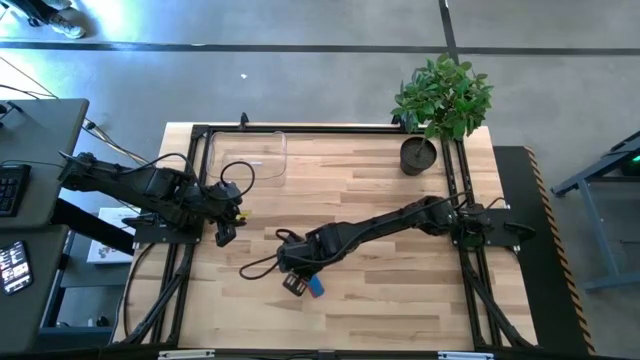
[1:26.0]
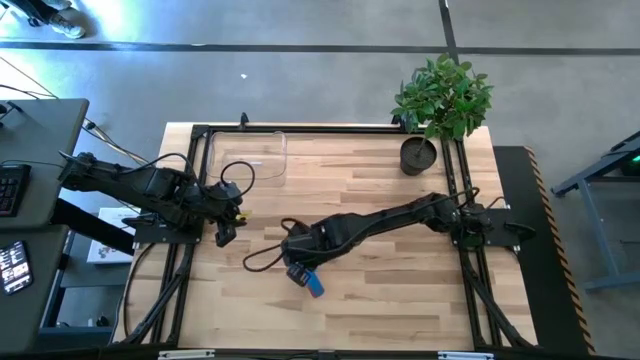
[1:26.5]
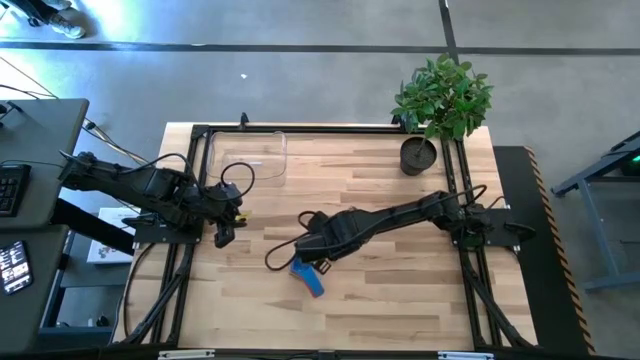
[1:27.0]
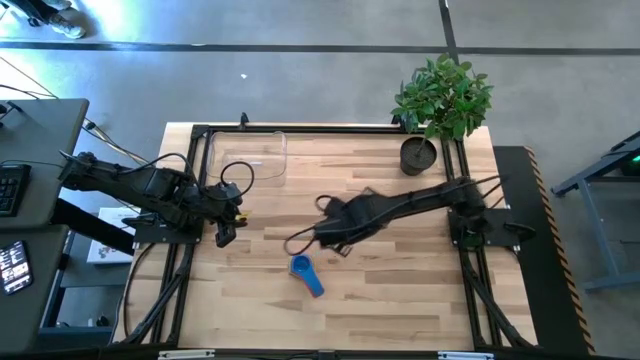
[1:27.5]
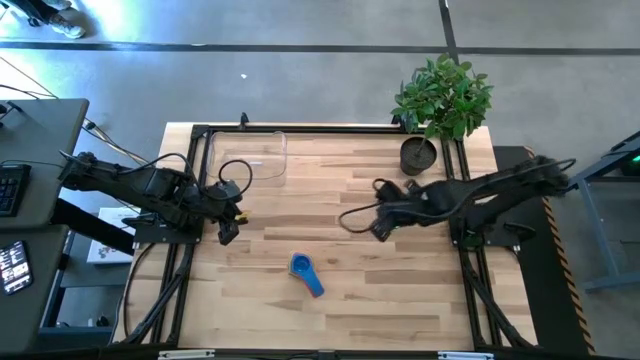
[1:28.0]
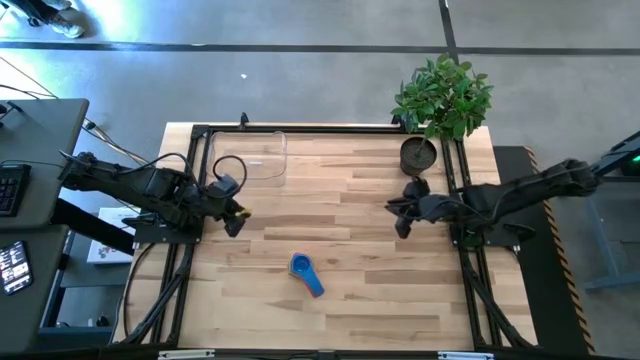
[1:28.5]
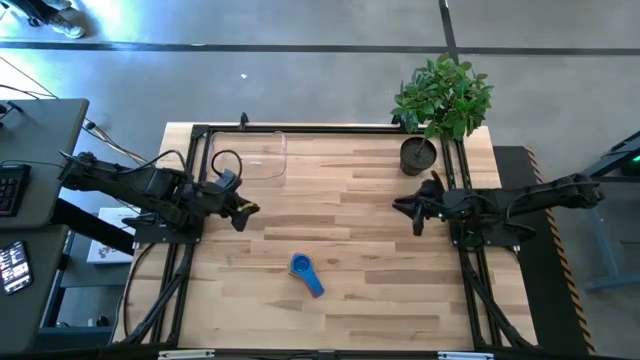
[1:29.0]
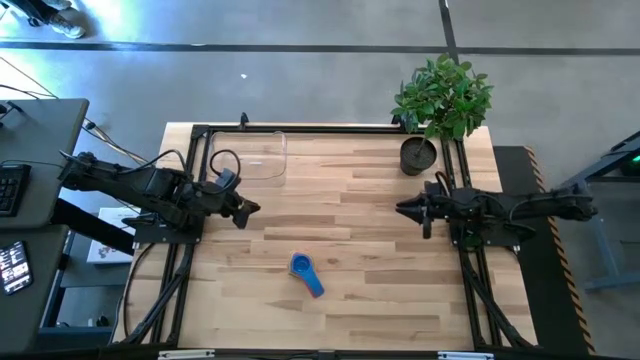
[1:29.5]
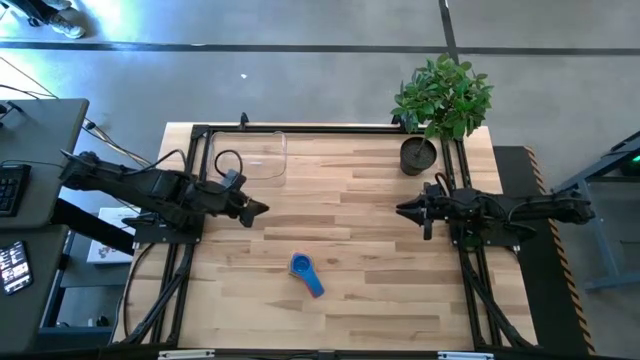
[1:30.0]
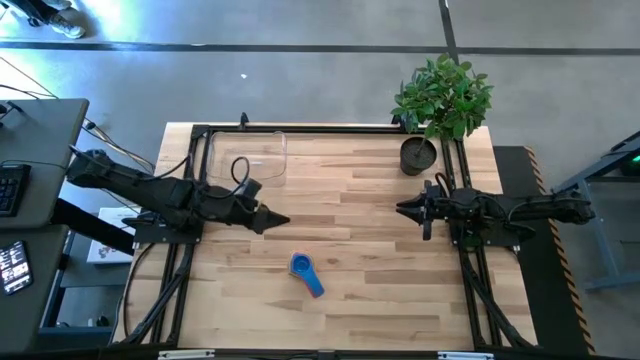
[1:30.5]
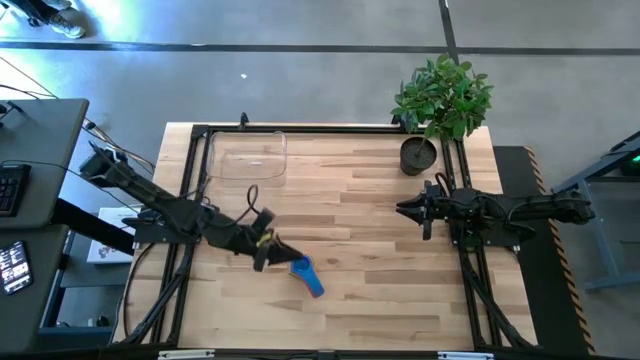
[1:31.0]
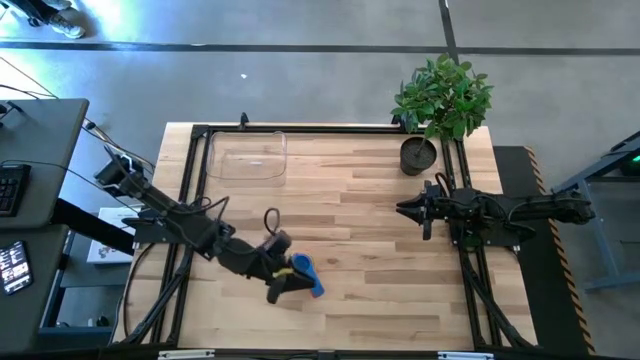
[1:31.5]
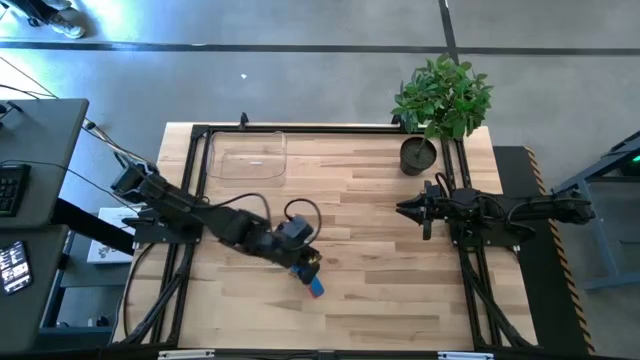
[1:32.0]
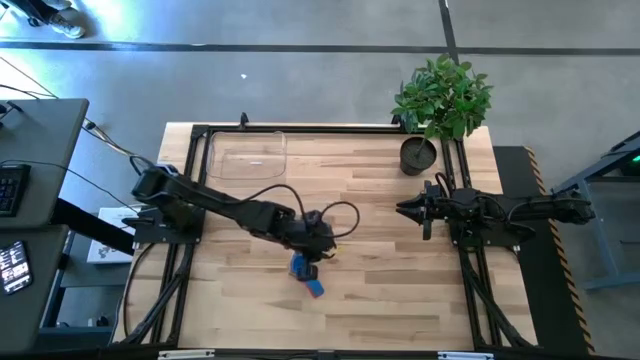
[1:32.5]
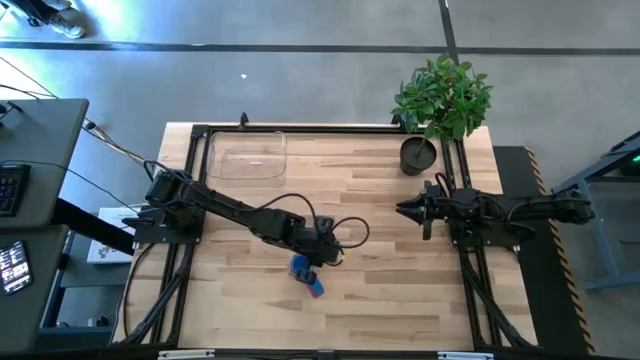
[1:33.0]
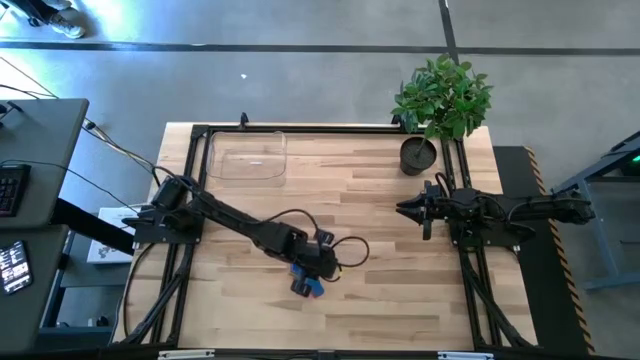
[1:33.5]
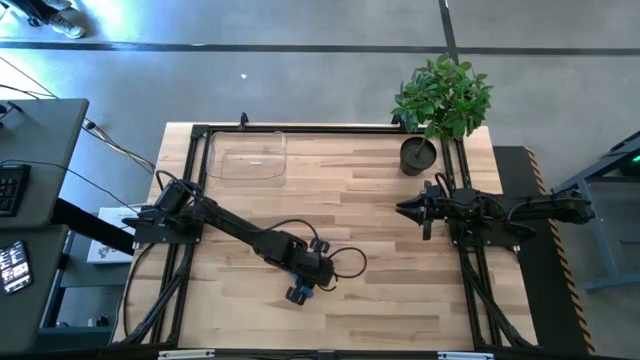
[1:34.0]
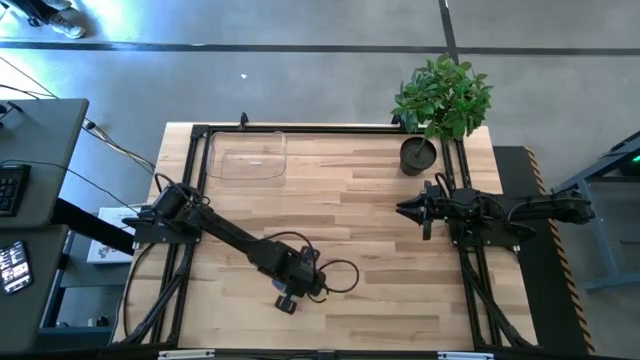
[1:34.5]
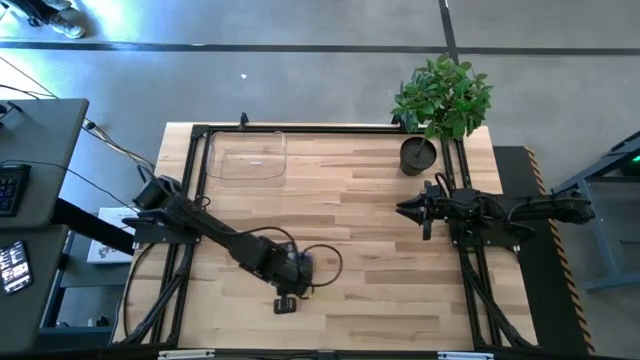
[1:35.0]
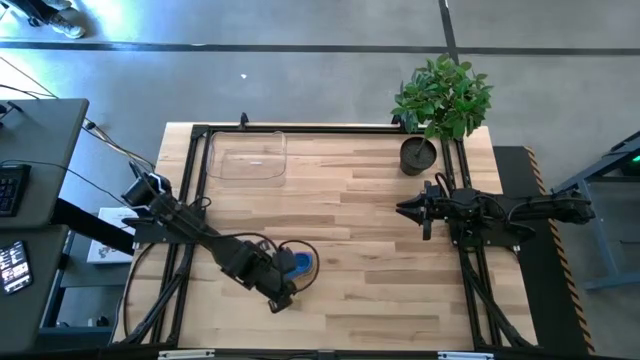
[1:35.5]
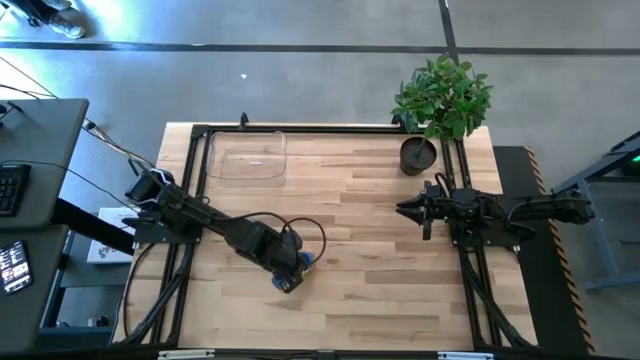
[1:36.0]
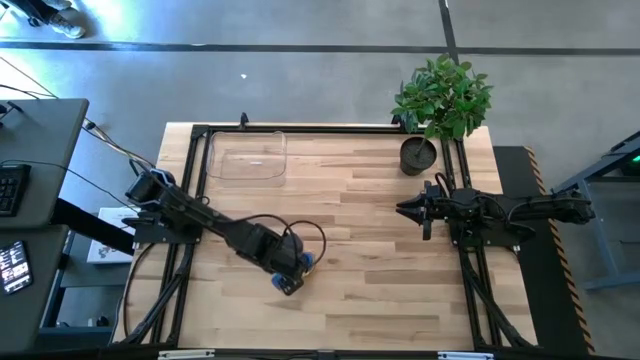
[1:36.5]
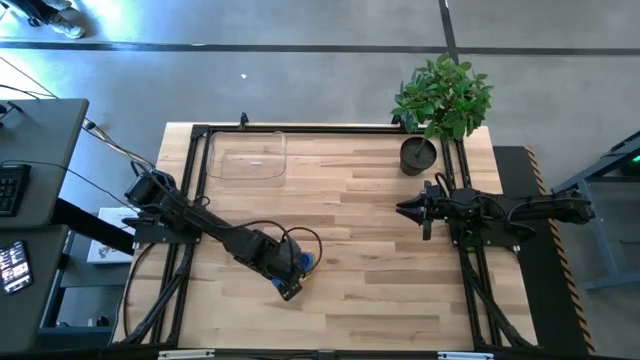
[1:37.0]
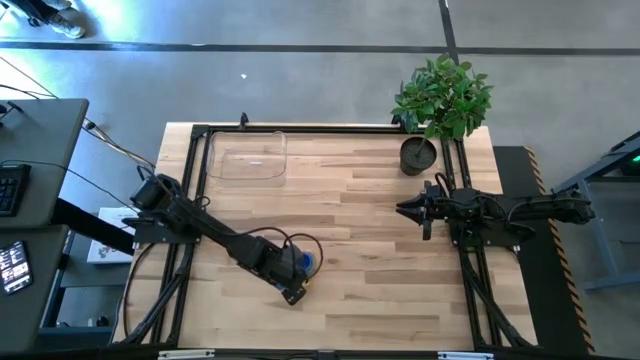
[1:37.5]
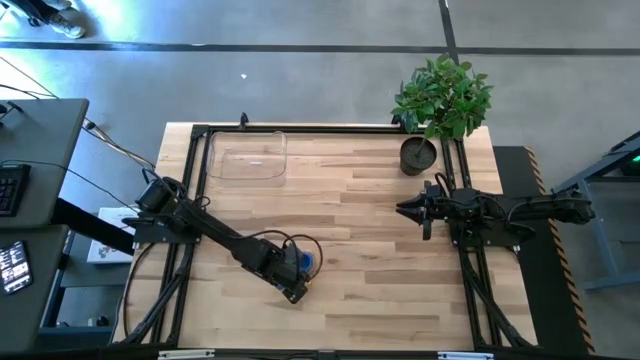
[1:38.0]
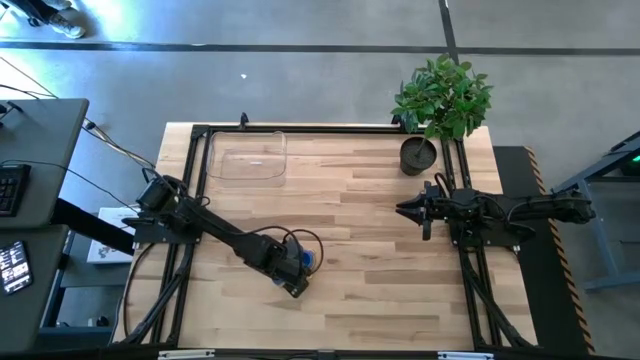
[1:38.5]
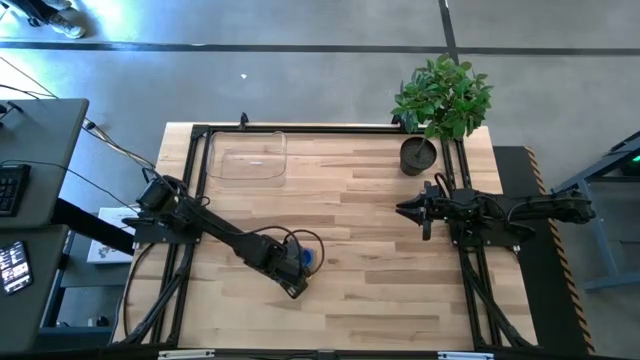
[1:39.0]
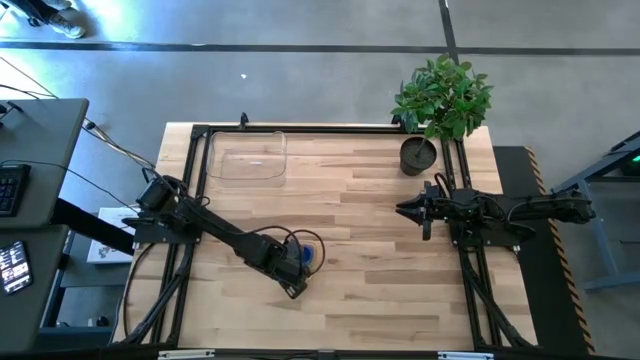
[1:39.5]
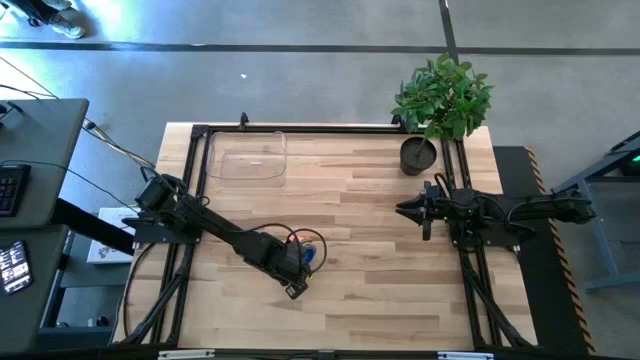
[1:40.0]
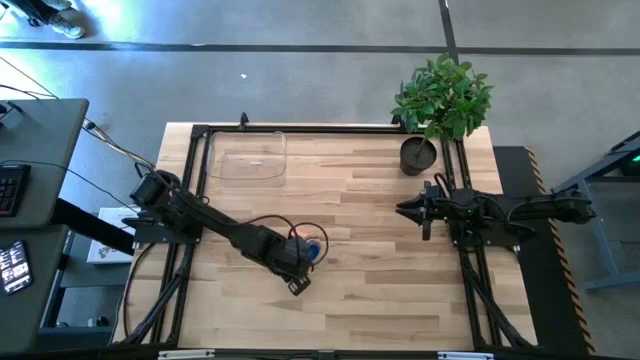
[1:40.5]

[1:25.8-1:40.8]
Task: Nest measuring cups in basket
Put the nested measuring cups into the transparent bin

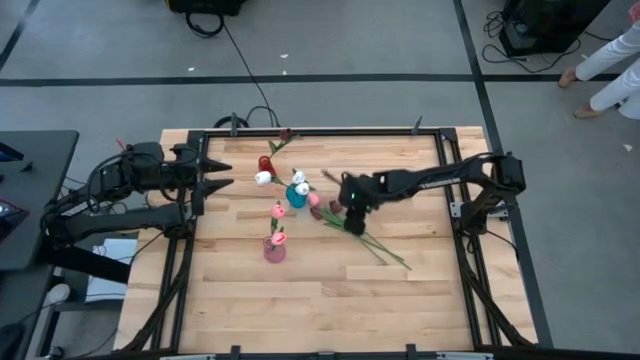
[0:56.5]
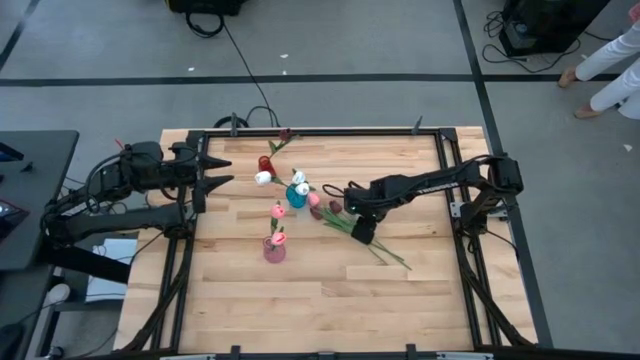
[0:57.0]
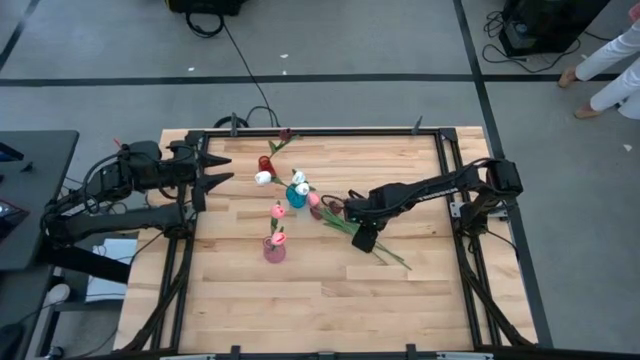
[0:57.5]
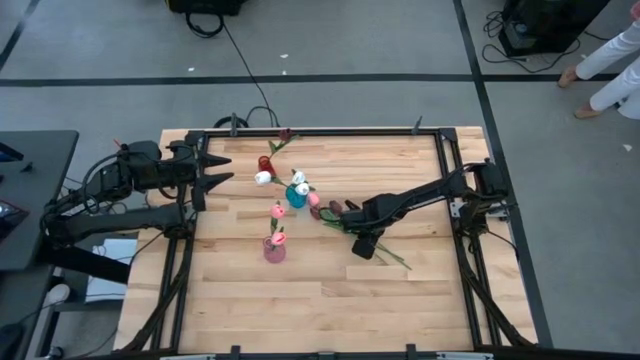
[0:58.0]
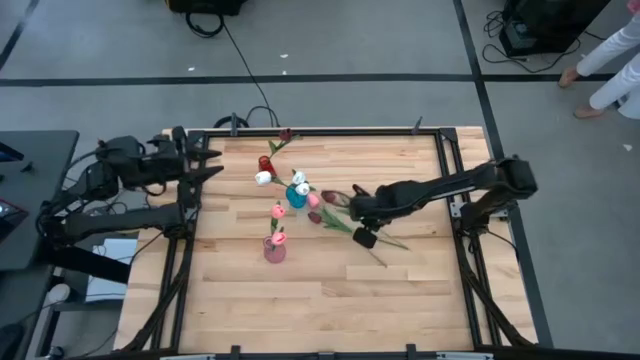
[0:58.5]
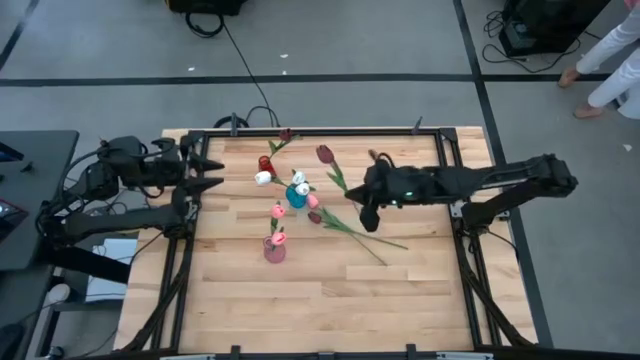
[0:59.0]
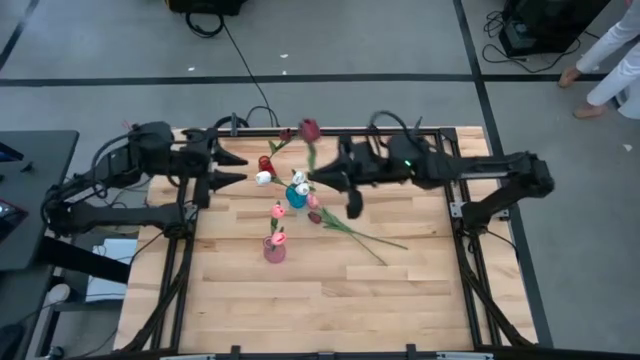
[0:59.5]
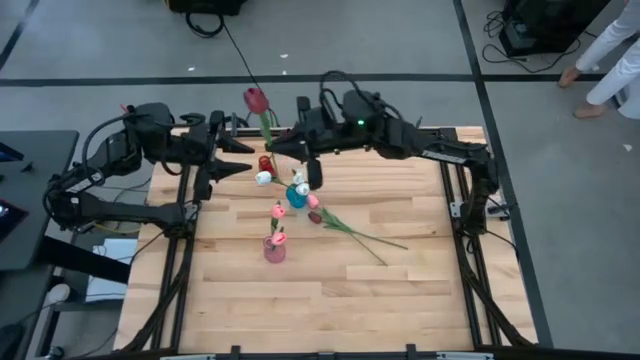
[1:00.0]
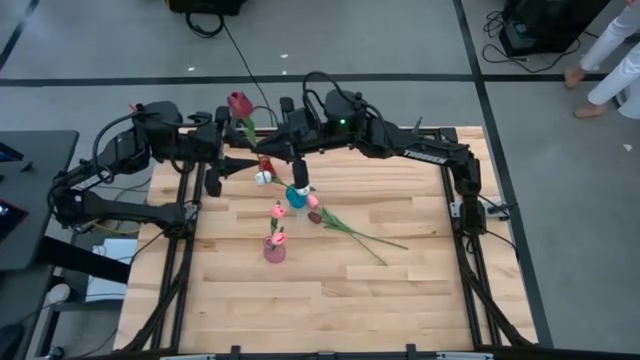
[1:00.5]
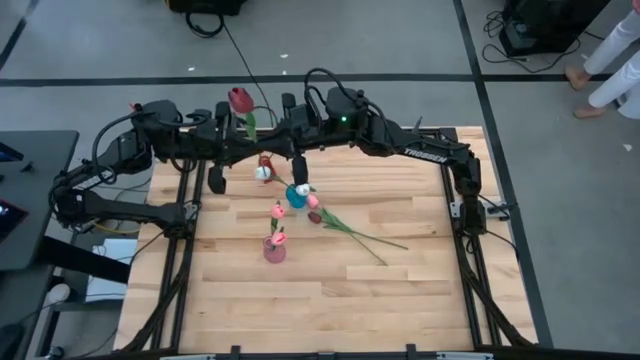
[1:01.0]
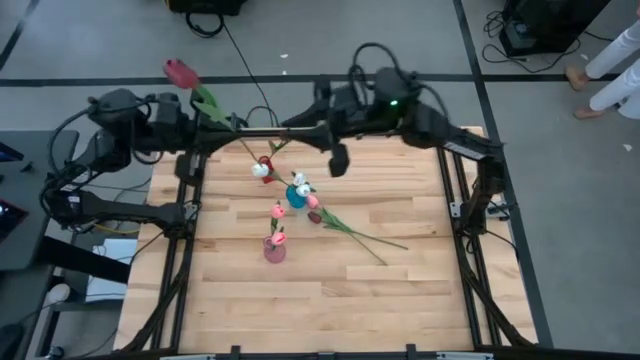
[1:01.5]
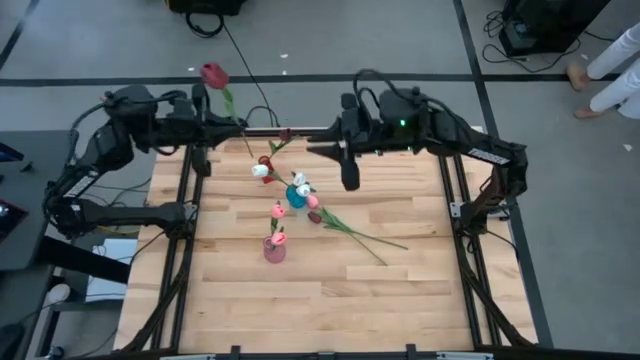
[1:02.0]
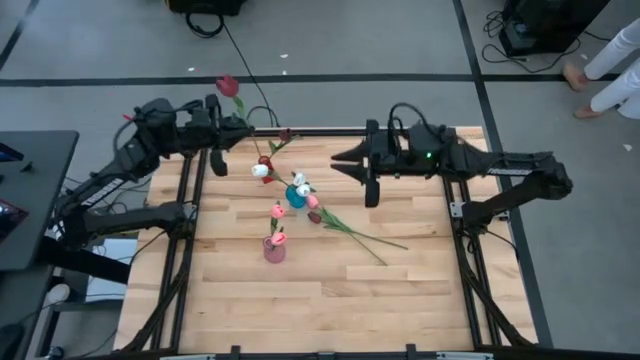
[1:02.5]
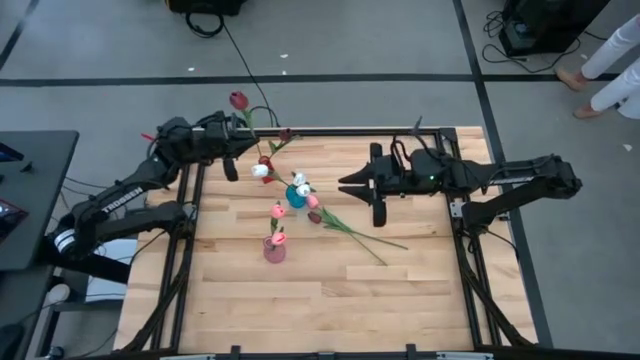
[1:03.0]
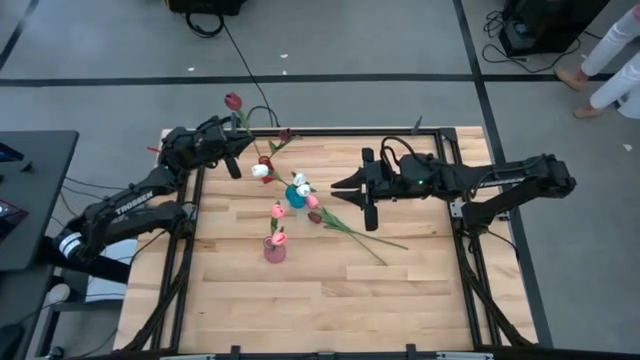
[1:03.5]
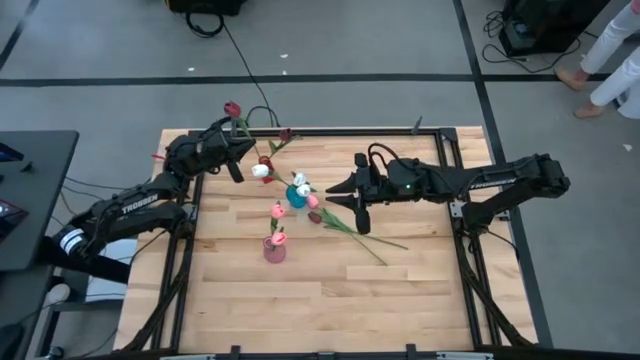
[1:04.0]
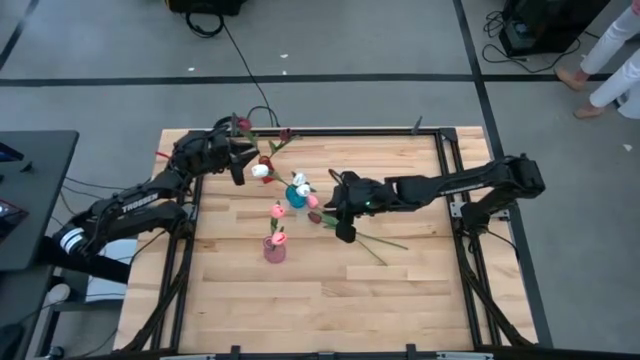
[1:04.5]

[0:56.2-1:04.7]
Task: Sort flowers into vase by color
Put the right red flower into the red vase
